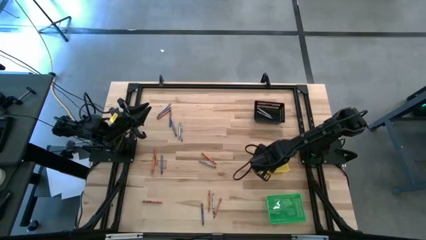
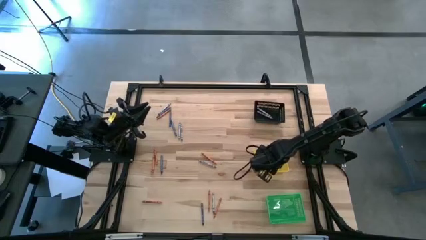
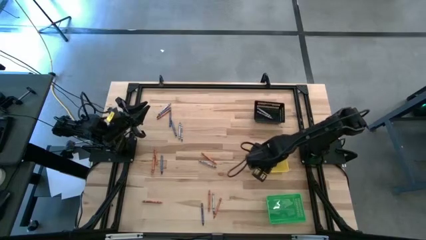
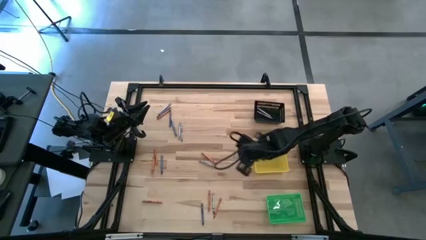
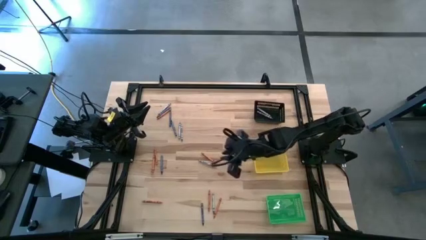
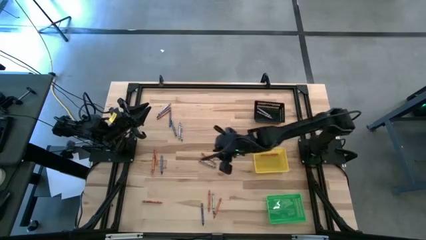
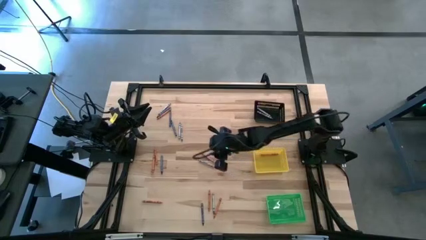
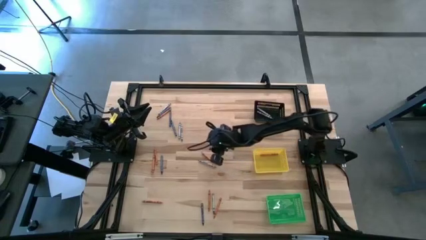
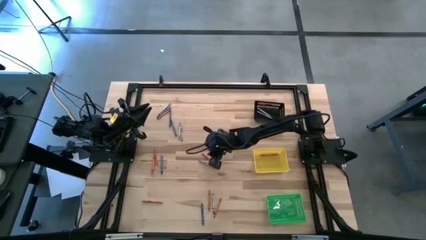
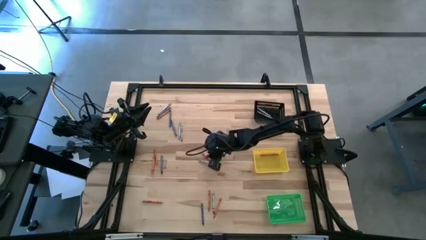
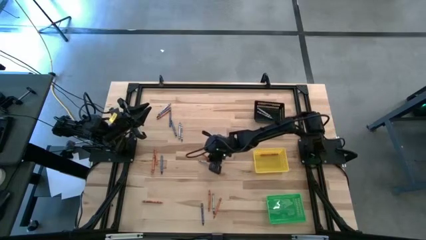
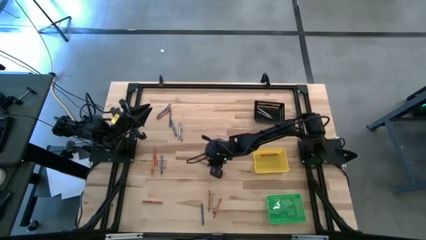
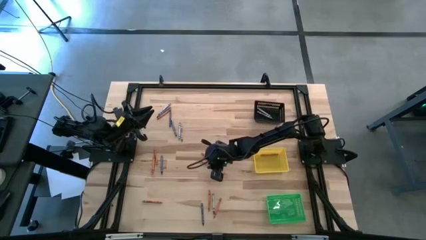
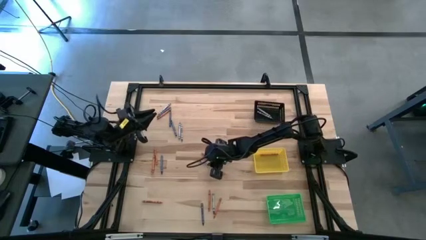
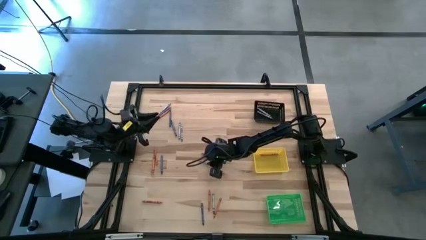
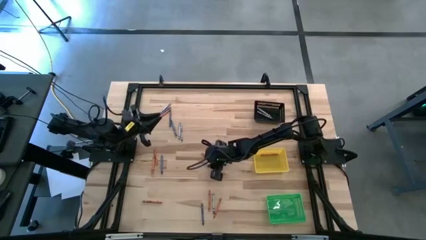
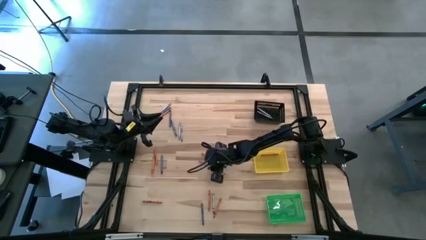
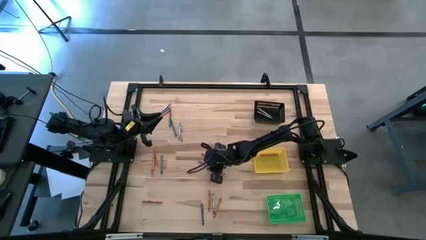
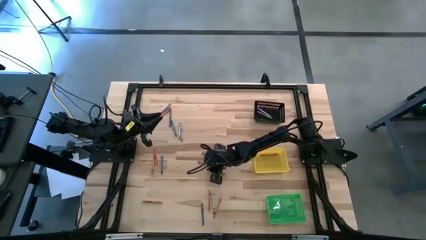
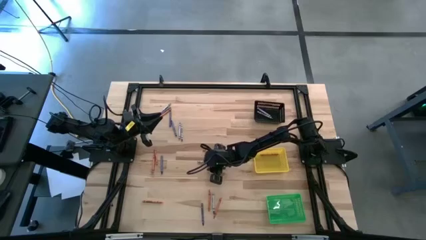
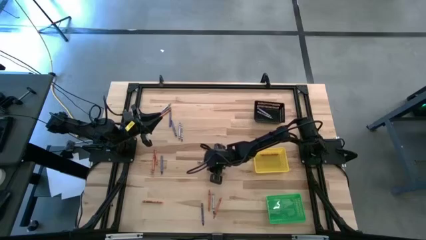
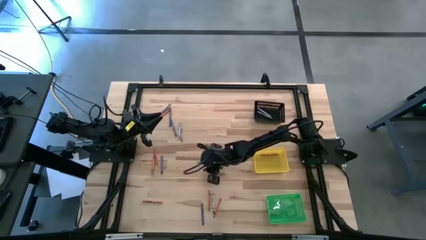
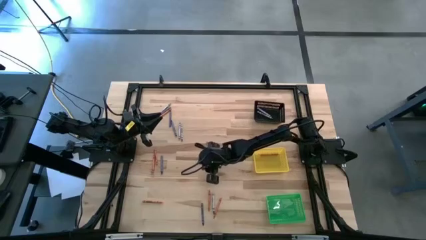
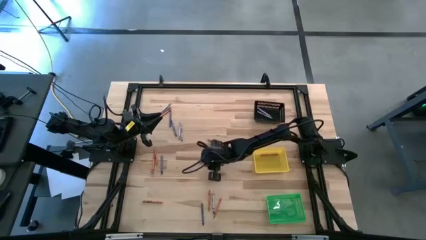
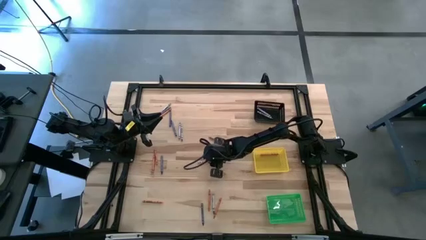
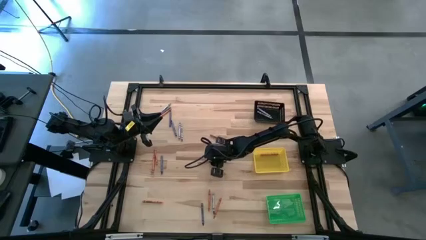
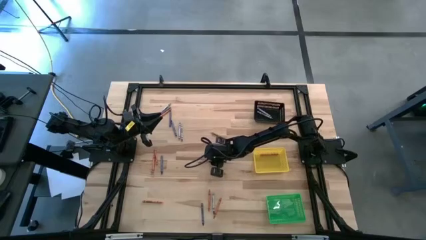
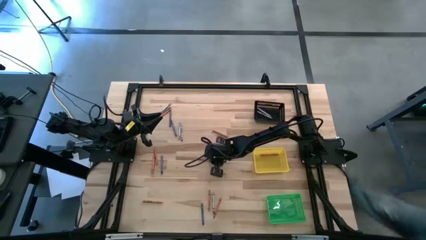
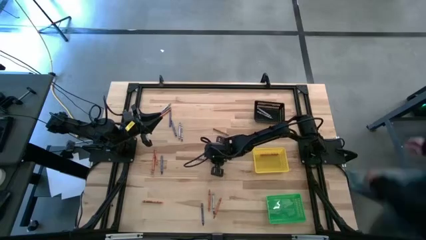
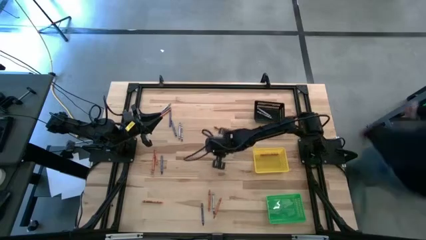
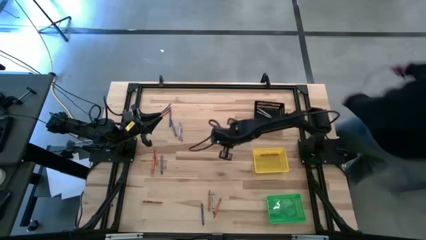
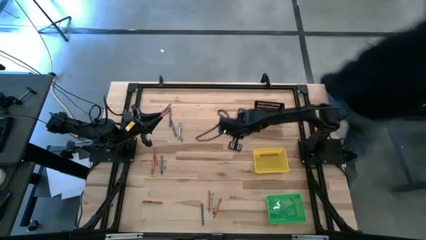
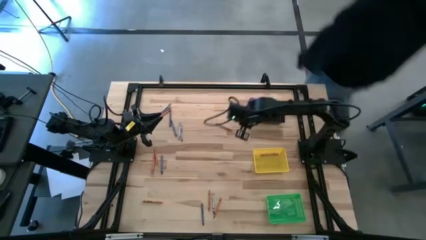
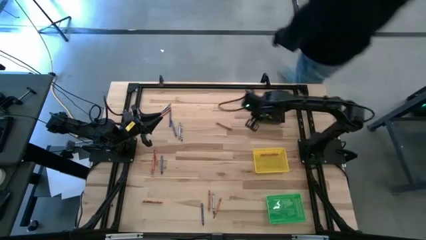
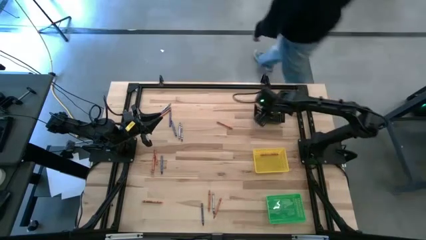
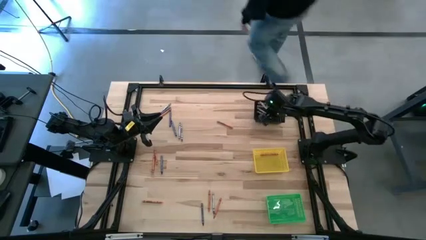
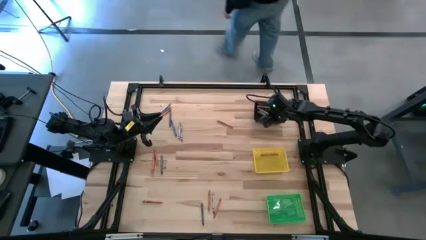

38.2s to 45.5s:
Task: Sort crayons
Put the gray crayon into the black basket

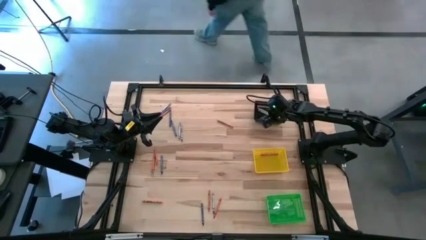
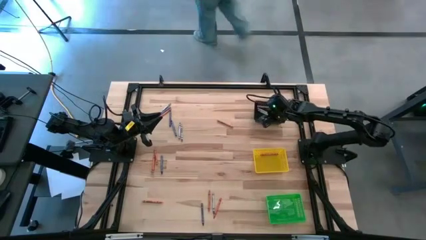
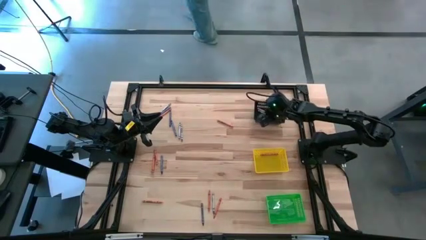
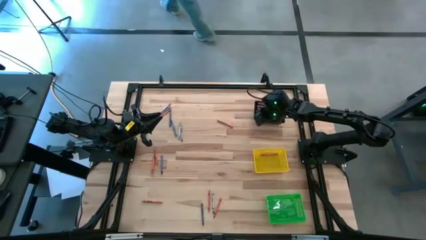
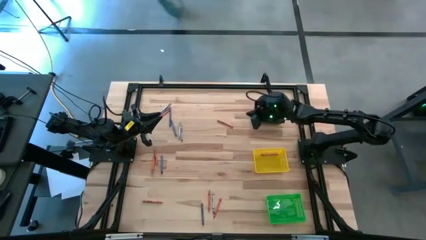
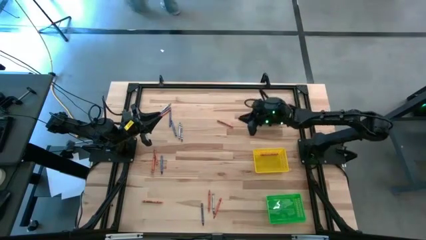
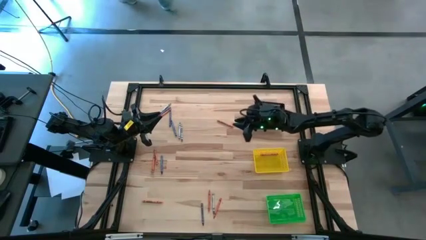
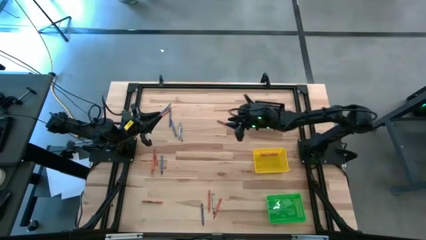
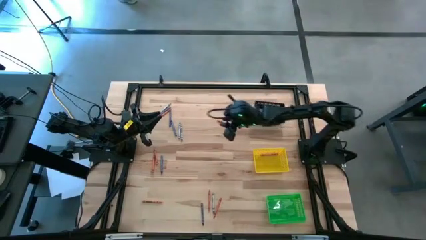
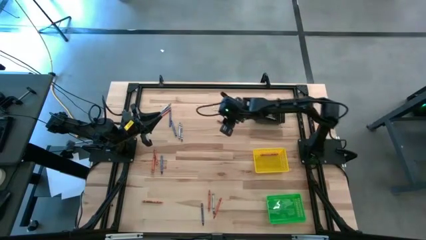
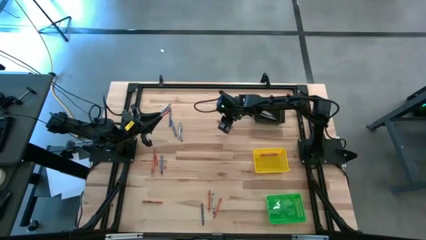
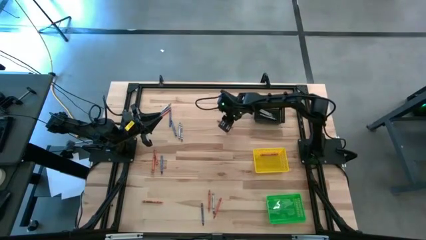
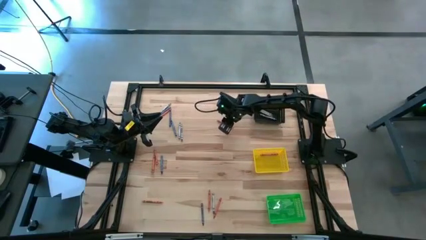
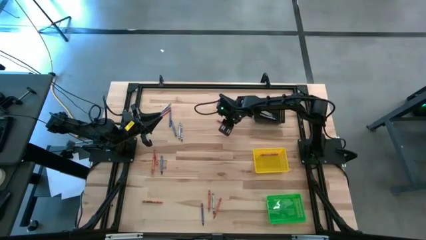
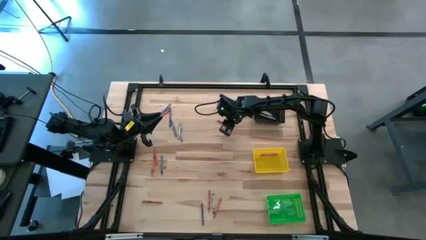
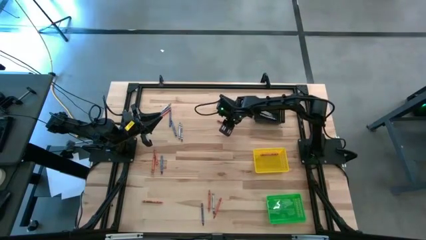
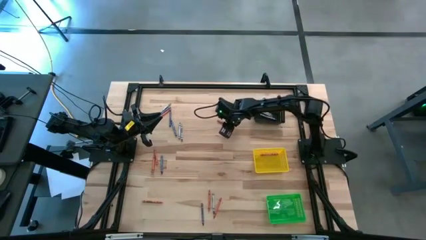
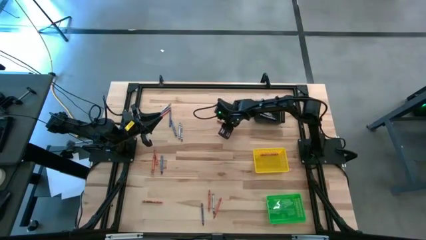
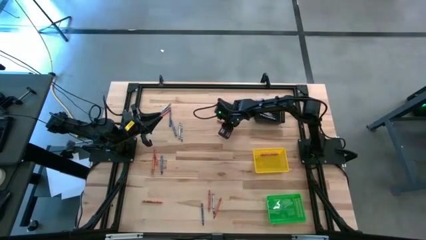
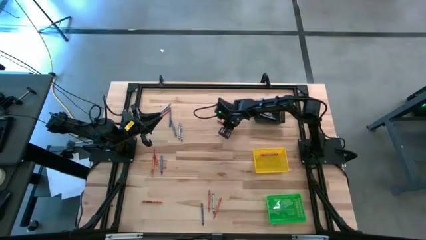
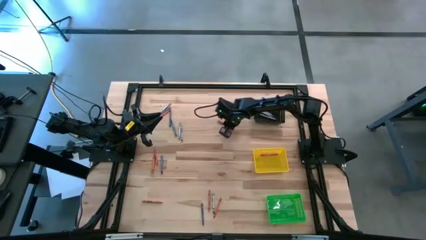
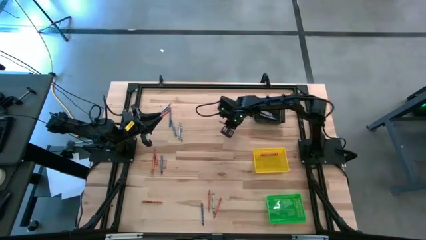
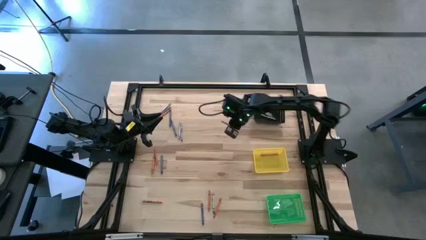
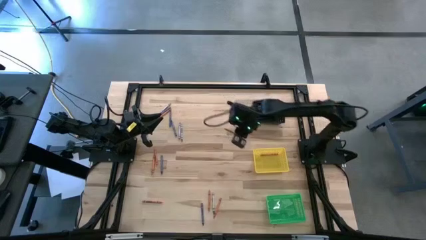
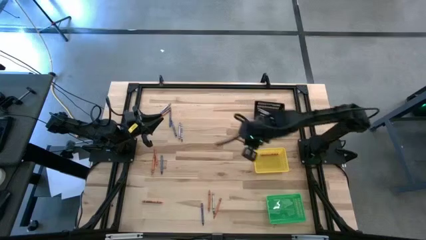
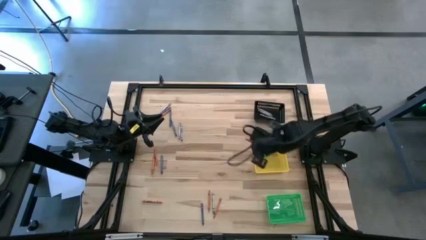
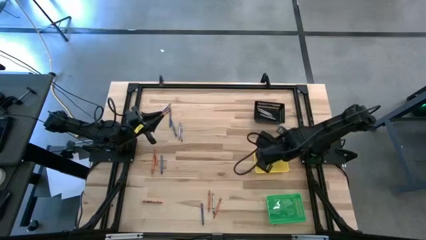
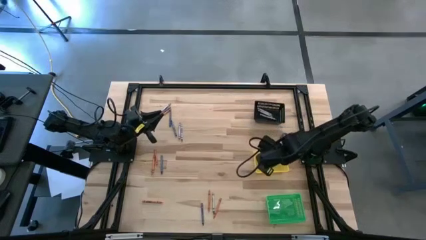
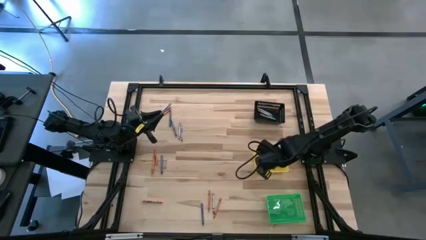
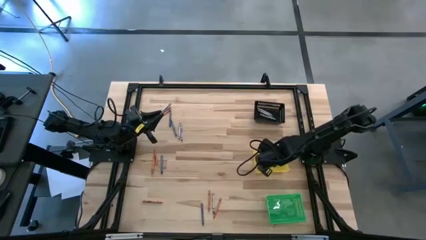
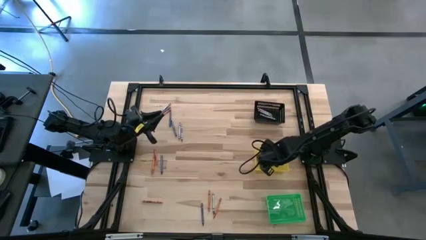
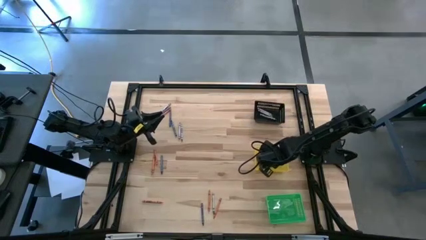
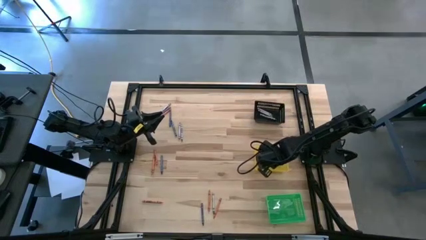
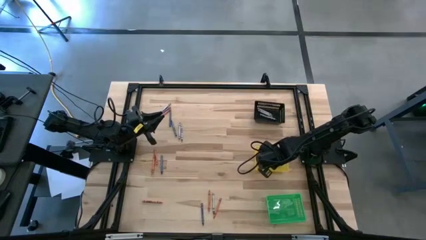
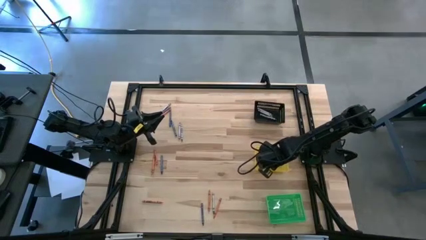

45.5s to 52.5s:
Put the orange crayon into the yellow basket
